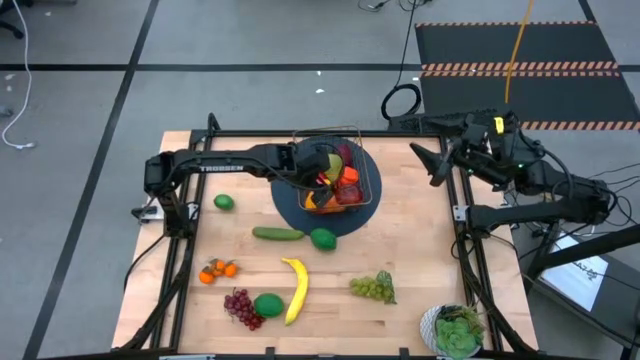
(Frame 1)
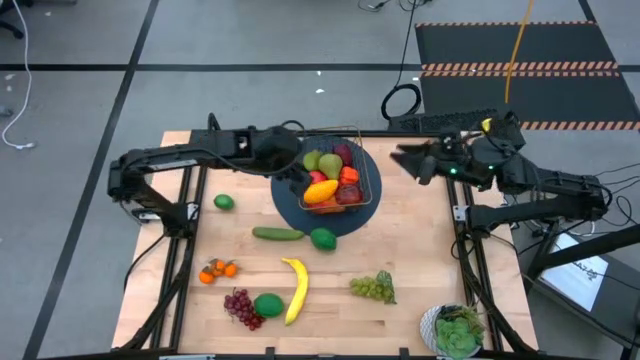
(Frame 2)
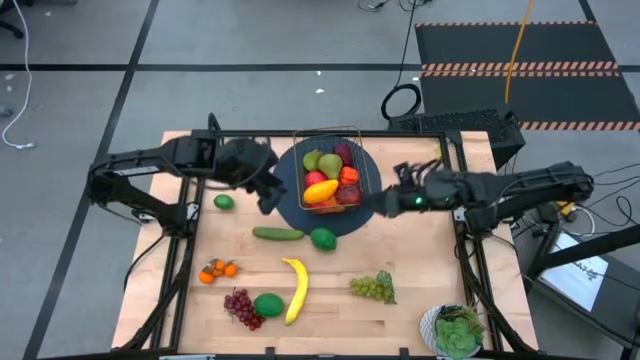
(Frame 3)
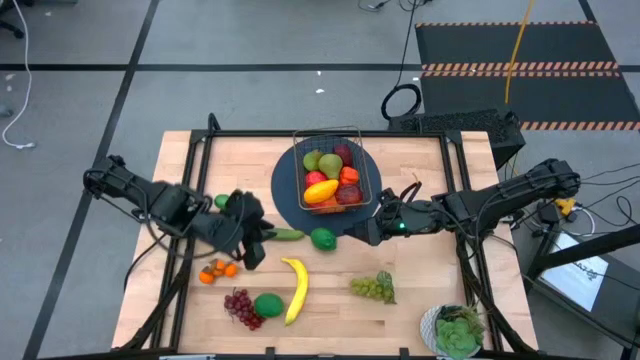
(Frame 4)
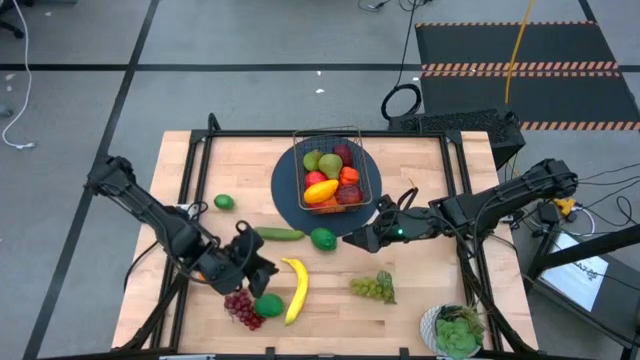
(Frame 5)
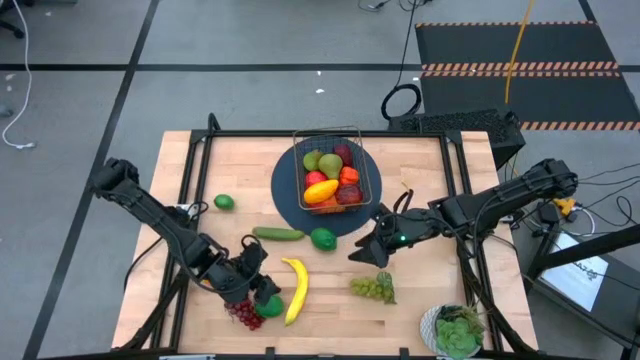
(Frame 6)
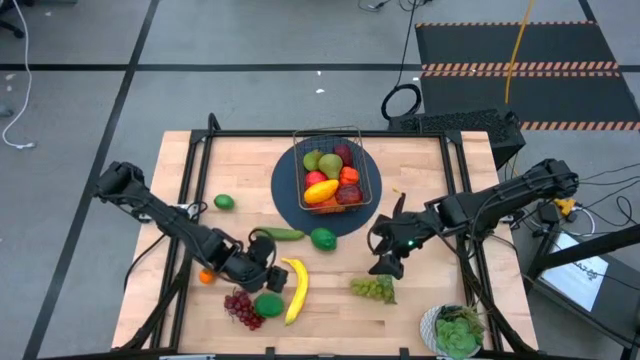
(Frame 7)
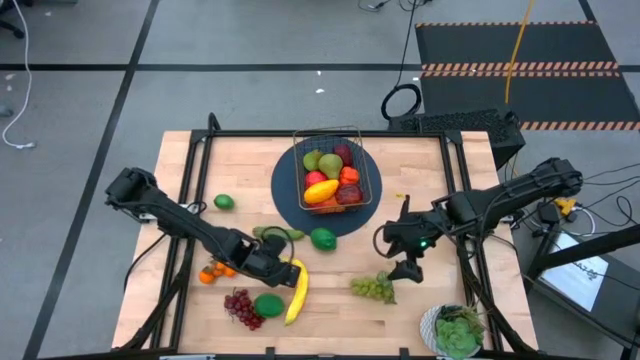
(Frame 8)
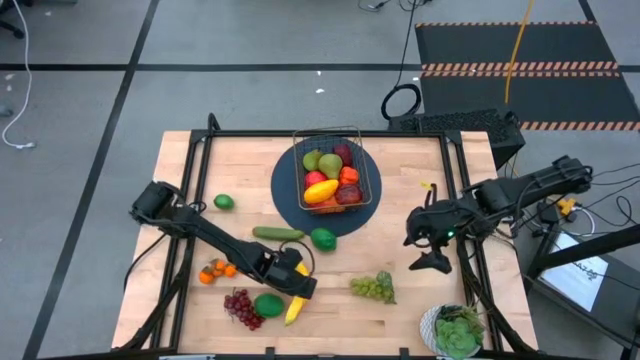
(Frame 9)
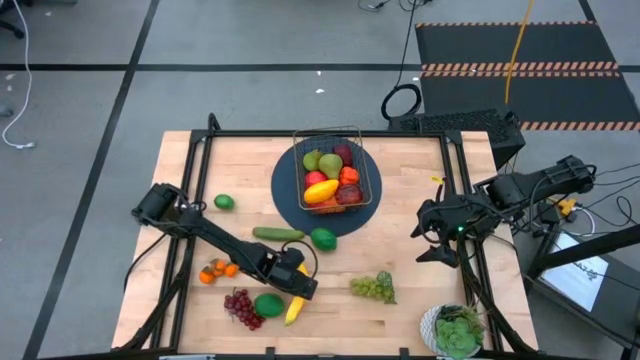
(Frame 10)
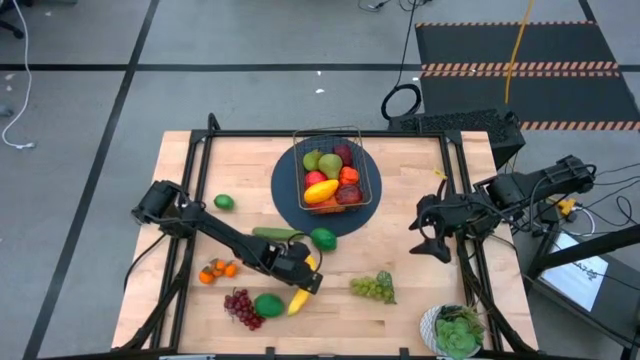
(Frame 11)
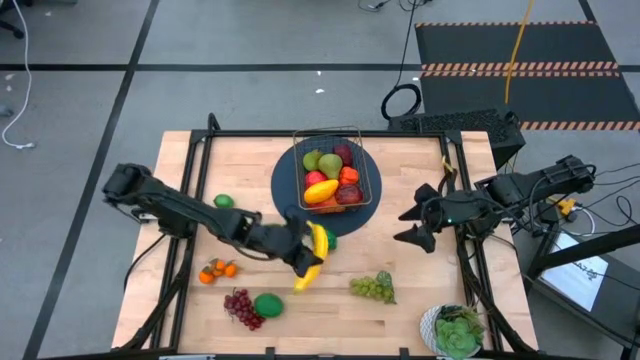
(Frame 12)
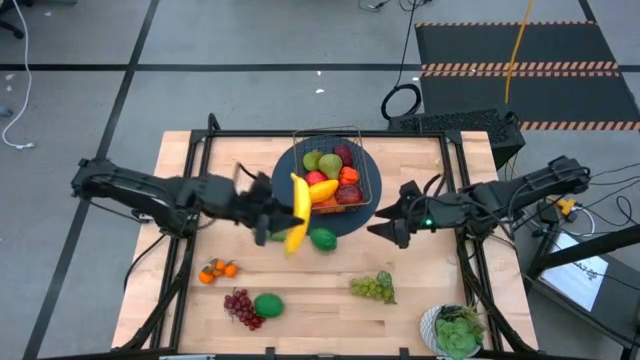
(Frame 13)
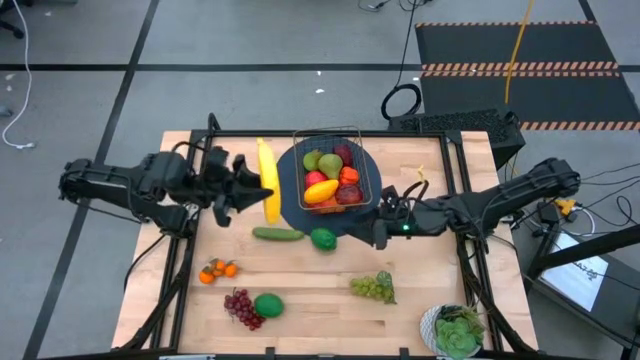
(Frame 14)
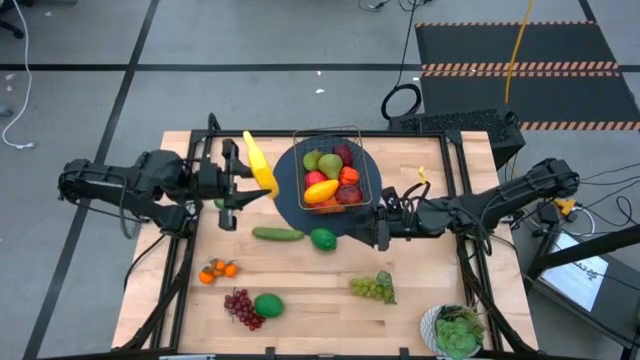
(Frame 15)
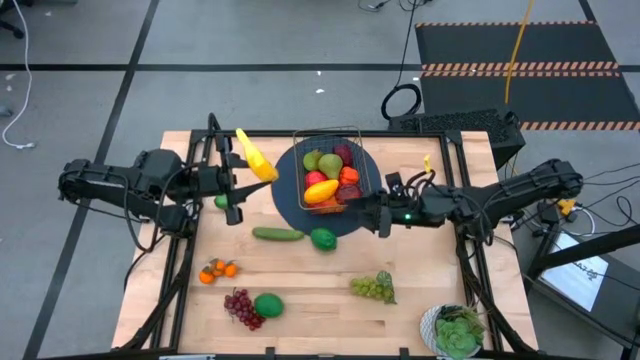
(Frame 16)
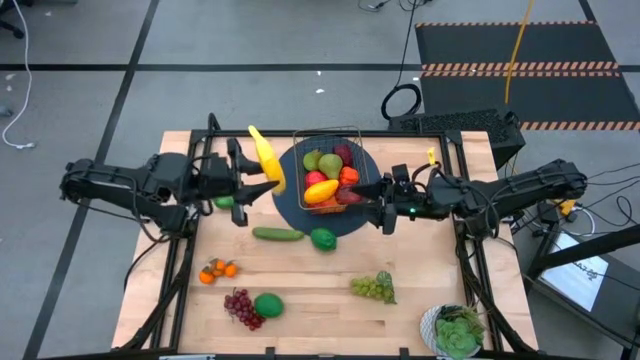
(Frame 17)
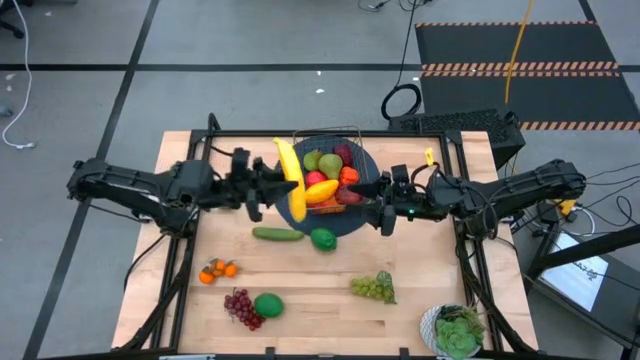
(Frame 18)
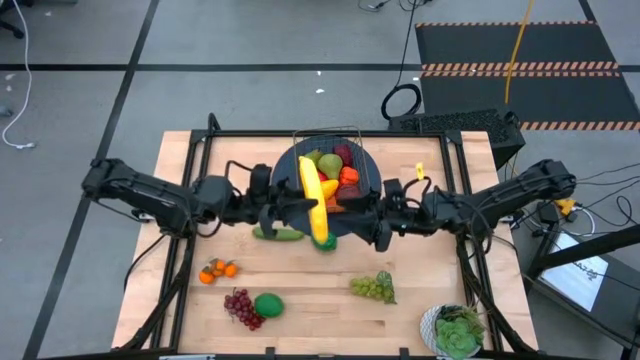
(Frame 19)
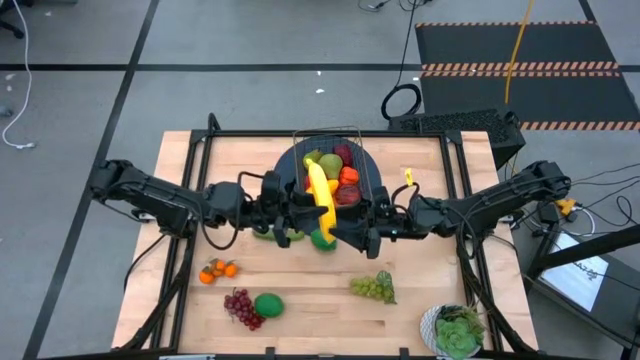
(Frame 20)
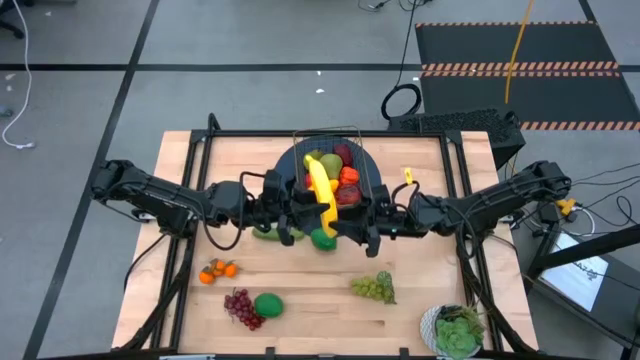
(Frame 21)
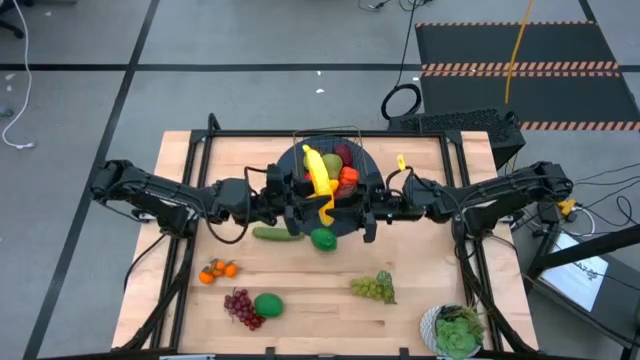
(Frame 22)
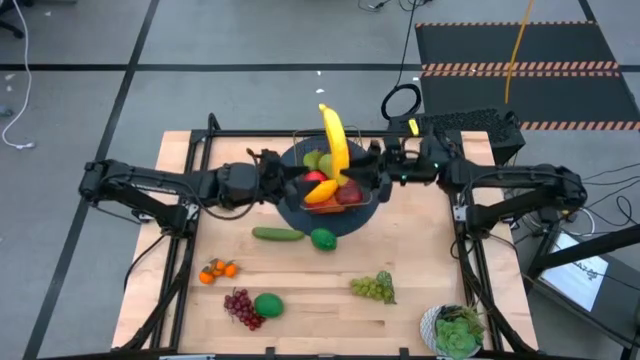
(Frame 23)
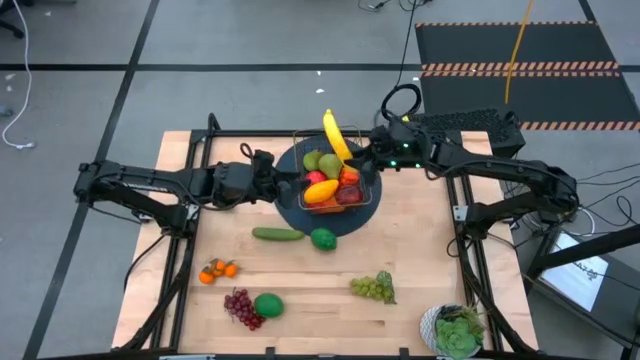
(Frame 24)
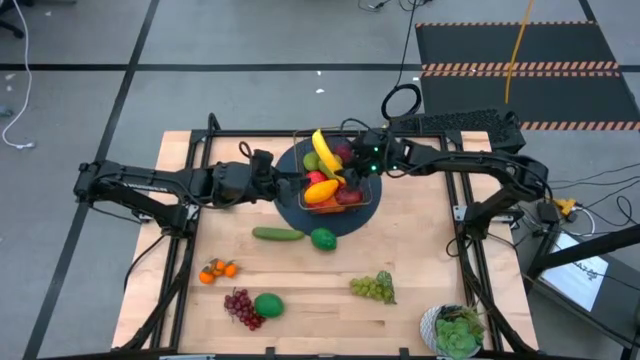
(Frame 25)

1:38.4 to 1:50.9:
Task: Build produce basket
Put the yellow banana into the gold wire basket

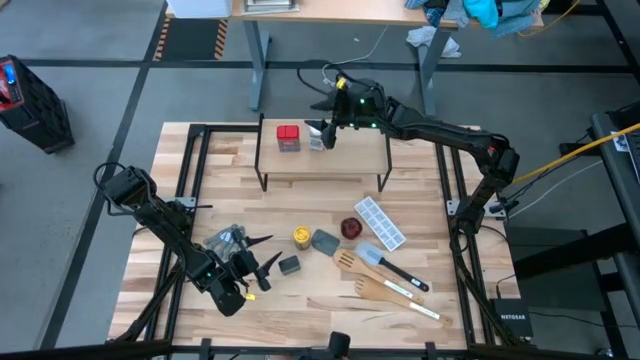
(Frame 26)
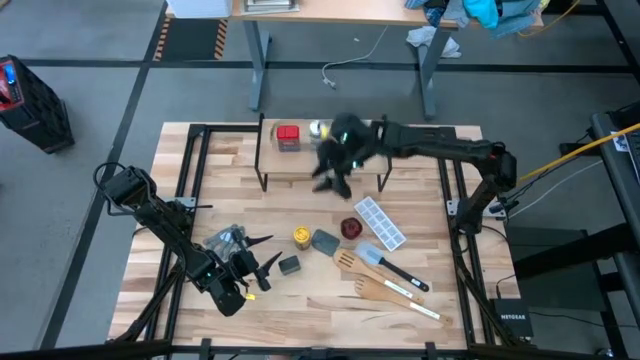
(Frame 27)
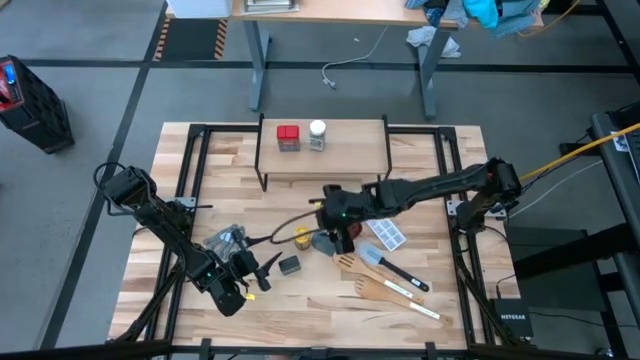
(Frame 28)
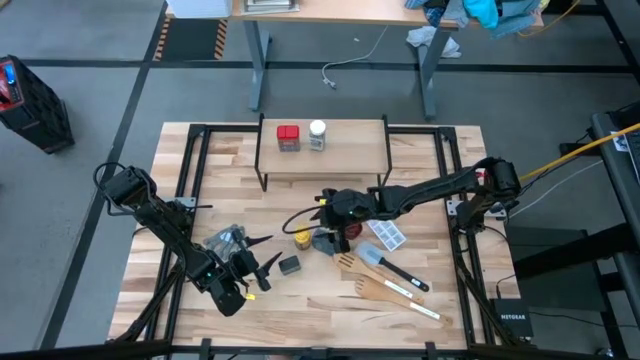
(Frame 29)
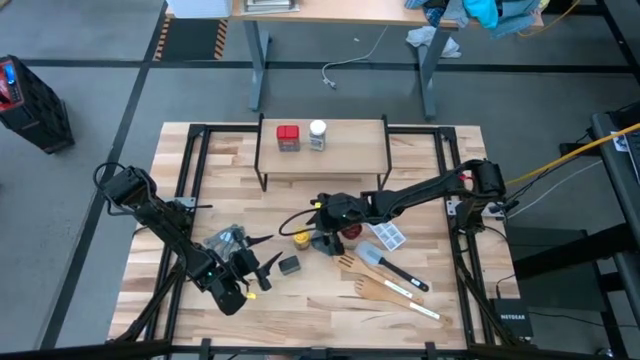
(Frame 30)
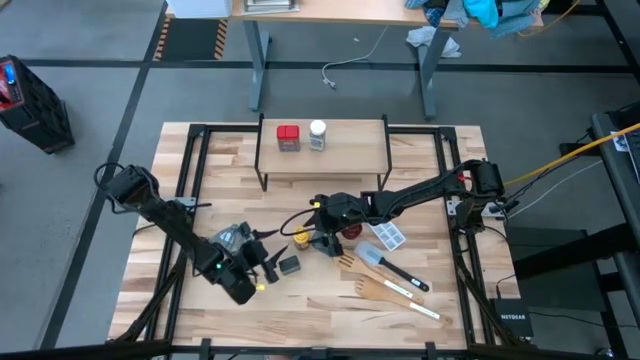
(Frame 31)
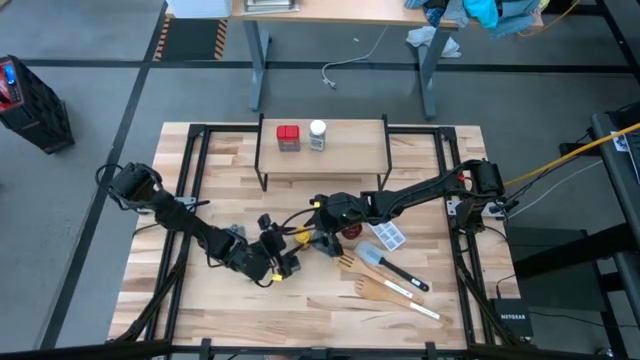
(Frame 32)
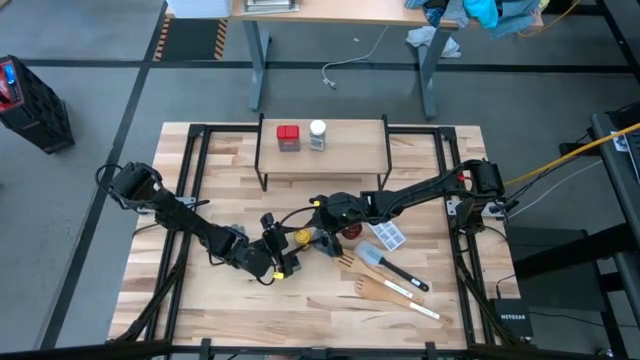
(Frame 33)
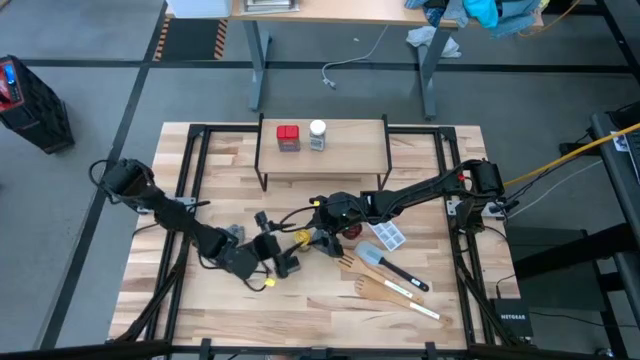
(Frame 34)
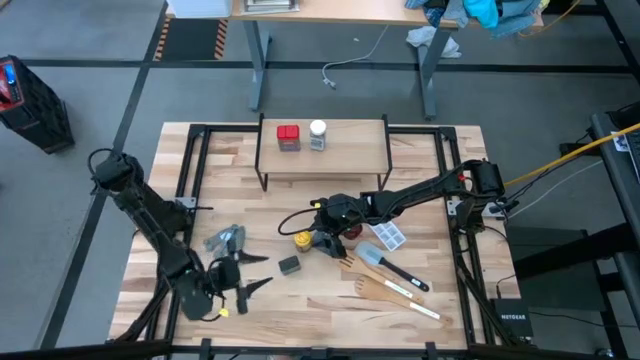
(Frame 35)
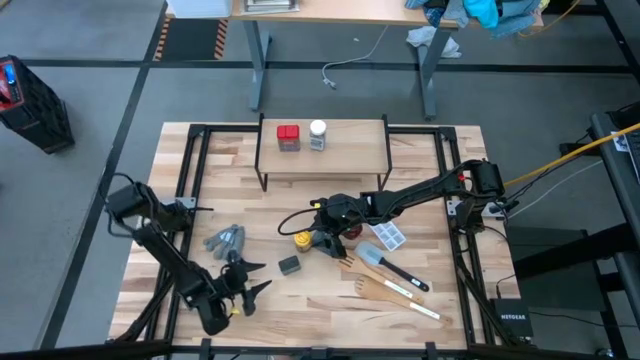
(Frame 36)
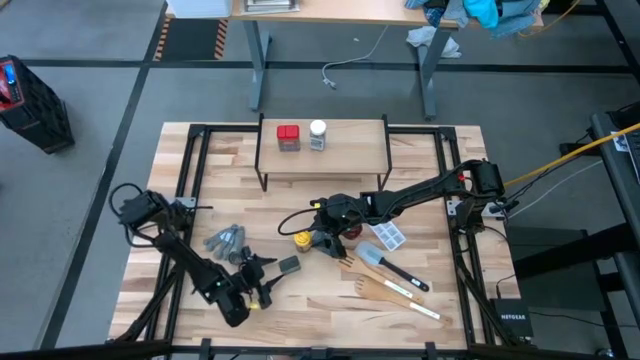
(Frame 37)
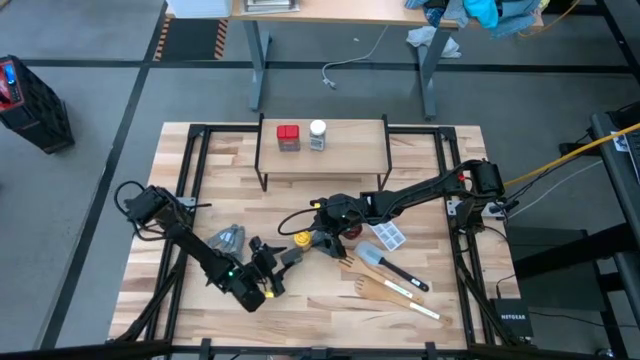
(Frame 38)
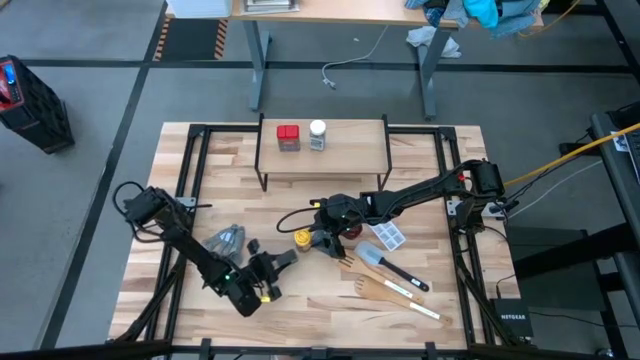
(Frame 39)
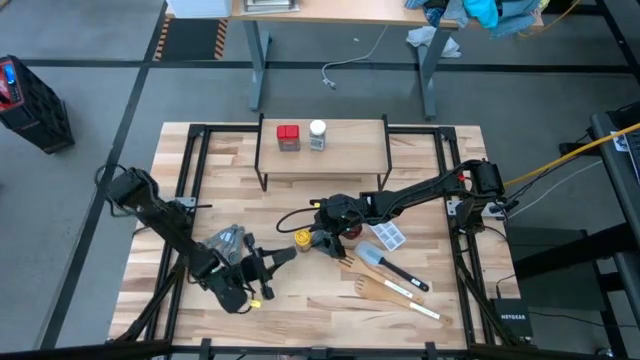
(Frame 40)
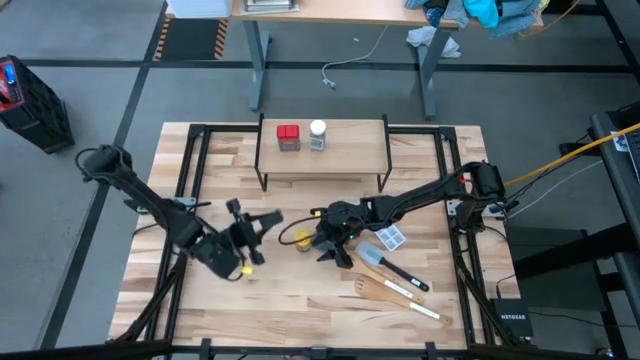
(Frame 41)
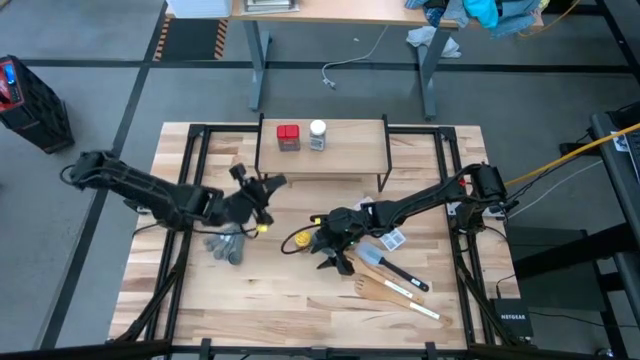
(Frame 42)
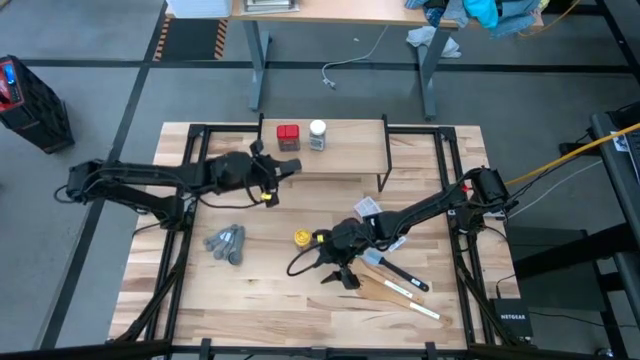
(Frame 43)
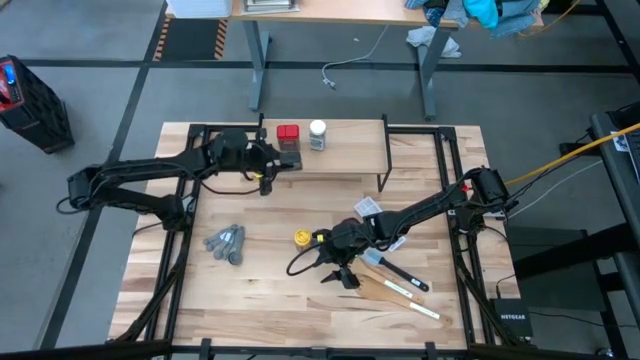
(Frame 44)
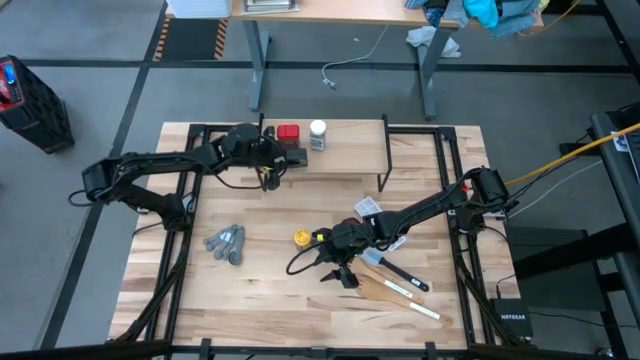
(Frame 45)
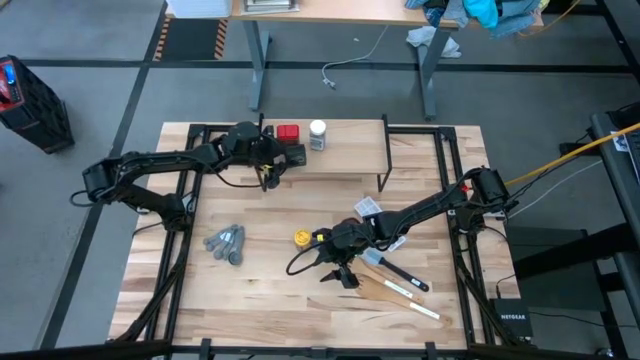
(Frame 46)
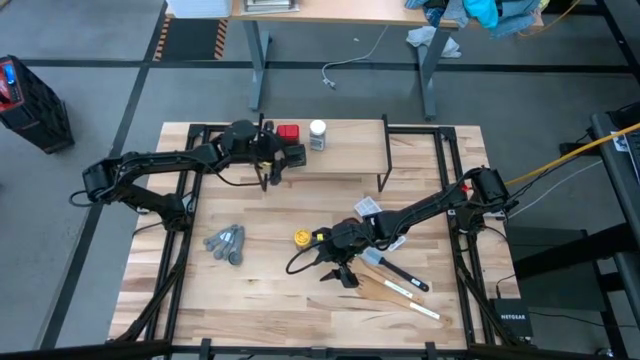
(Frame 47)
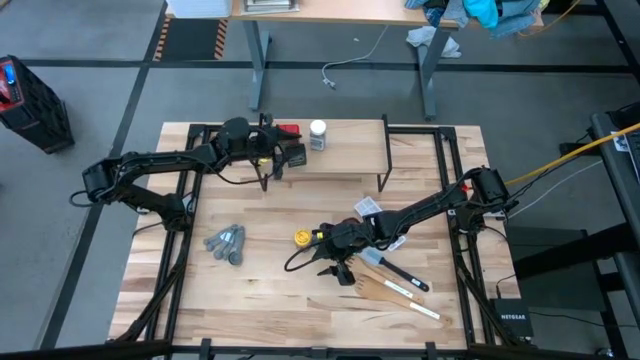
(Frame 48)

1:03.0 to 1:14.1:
Task: Shelf spices
Put the green seasoning can on the shelf
